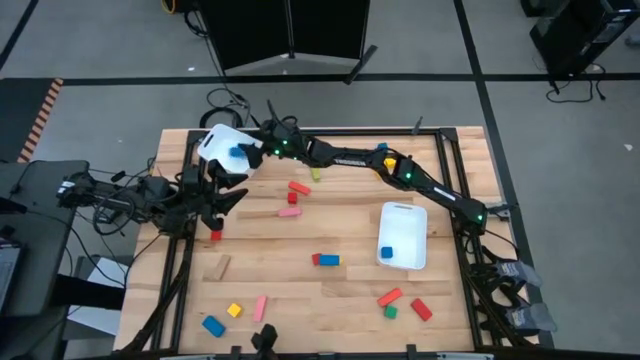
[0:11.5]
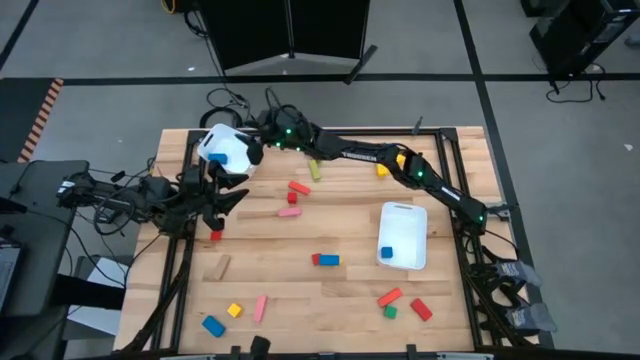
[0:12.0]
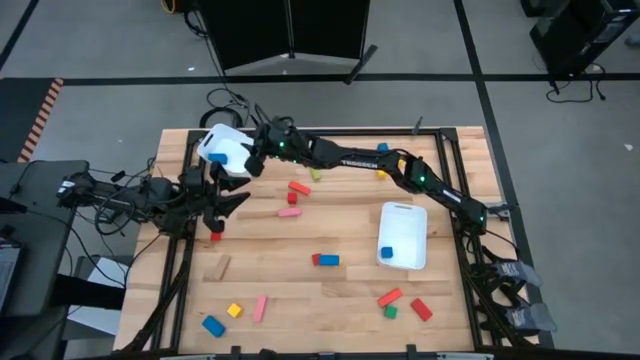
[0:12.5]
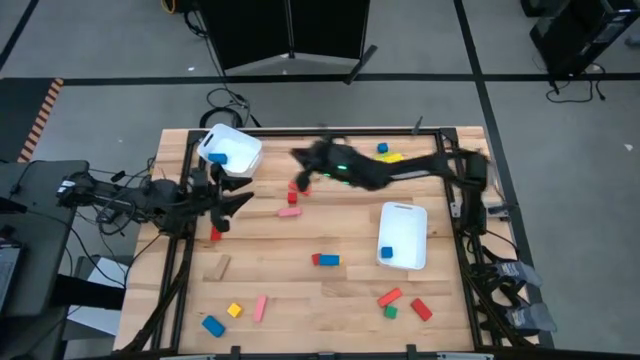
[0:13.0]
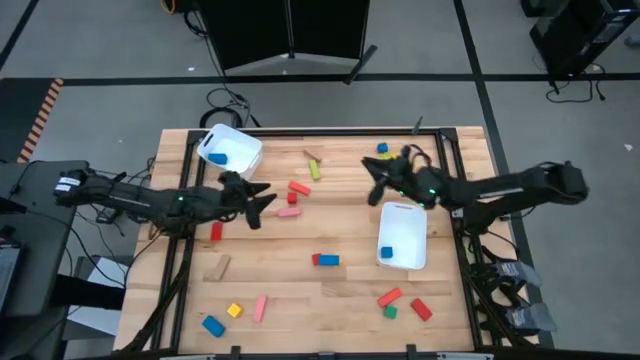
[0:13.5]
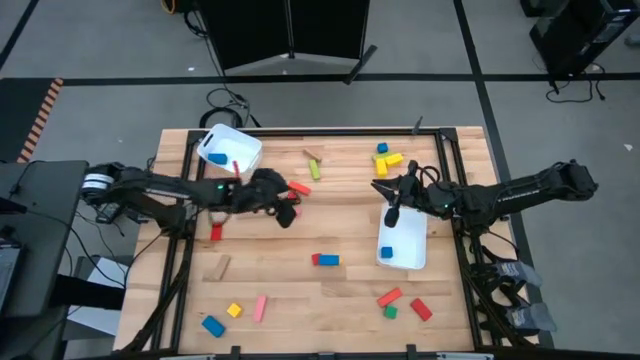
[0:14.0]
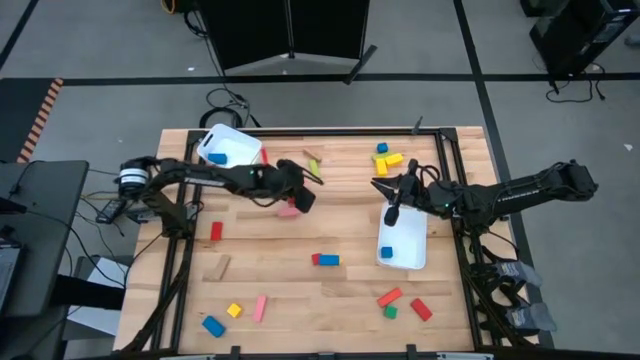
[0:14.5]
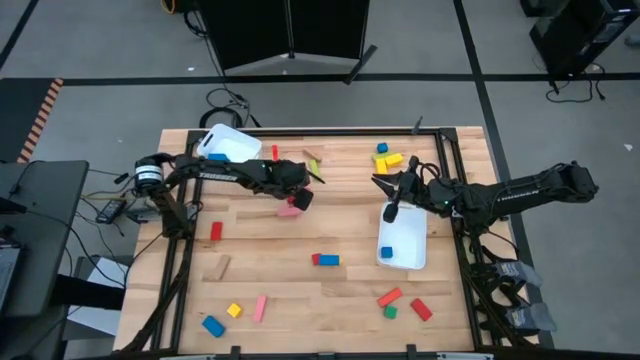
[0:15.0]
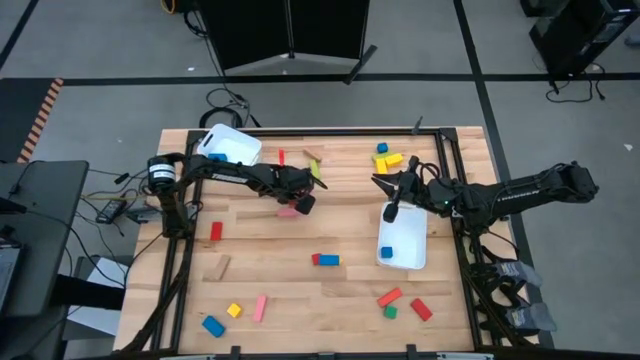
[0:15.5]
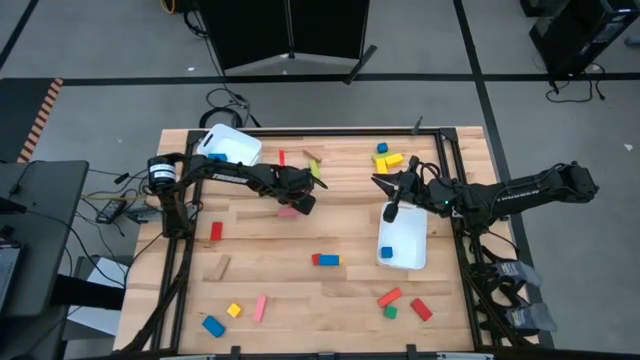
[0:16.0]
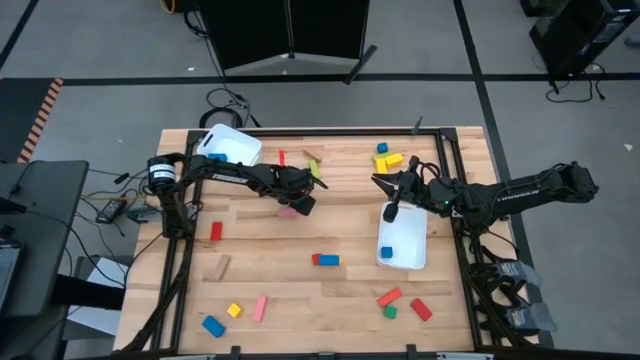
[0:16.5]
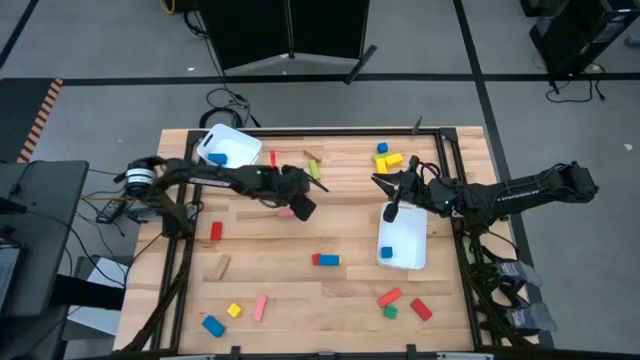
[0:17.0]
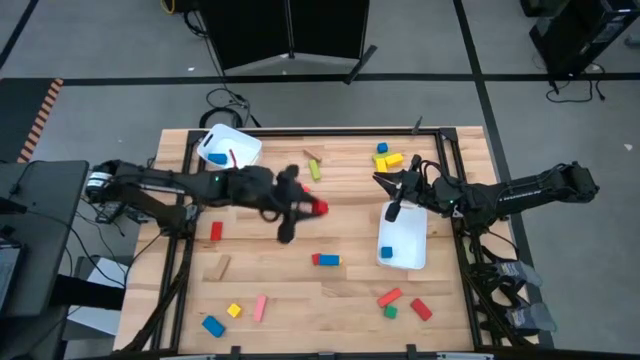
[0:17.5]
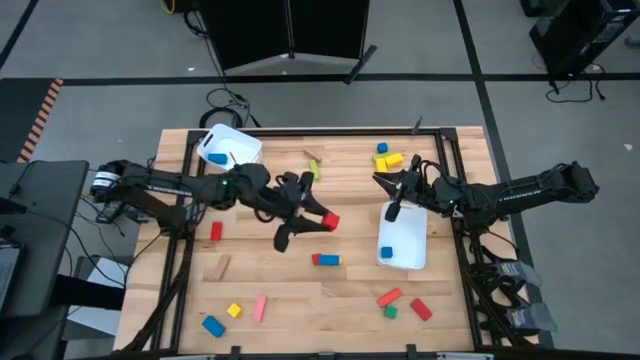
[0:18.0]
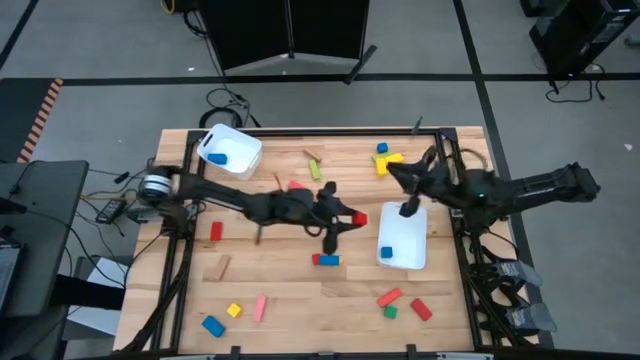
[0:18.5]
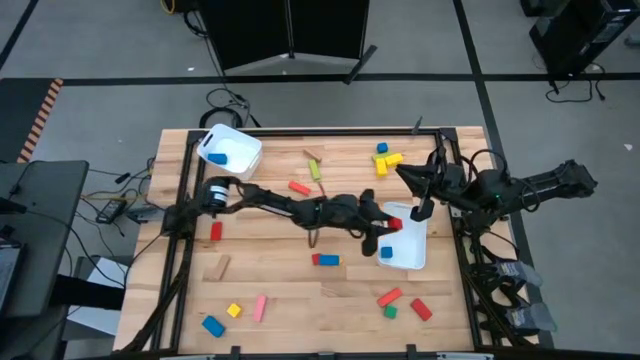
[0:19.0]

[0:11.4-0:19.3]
Task: Sort blocks by size
Put the top red cube block into the bottom white bin

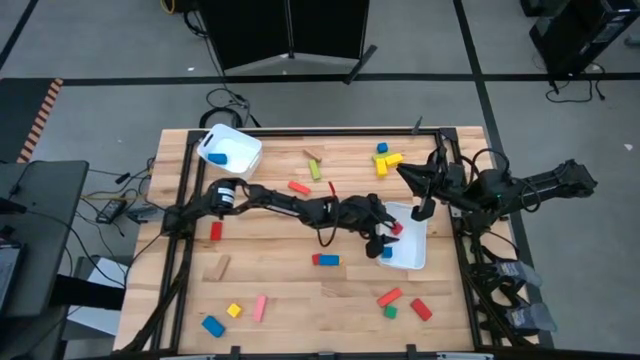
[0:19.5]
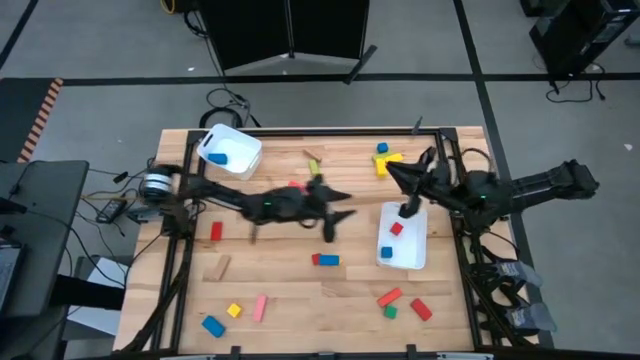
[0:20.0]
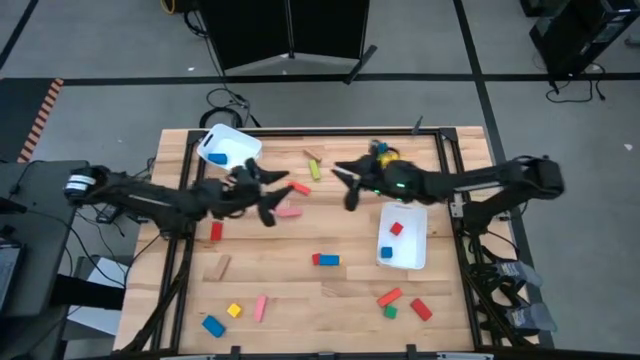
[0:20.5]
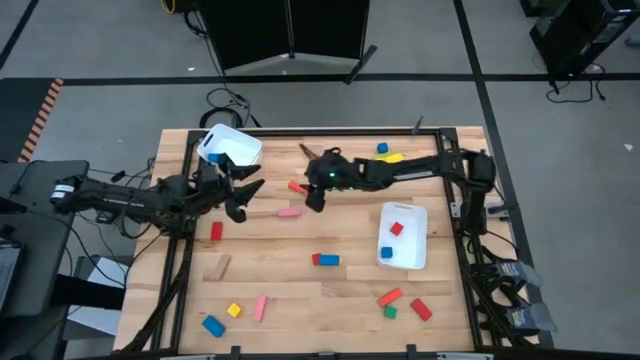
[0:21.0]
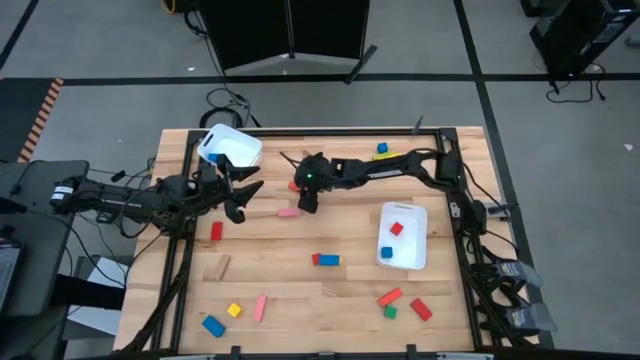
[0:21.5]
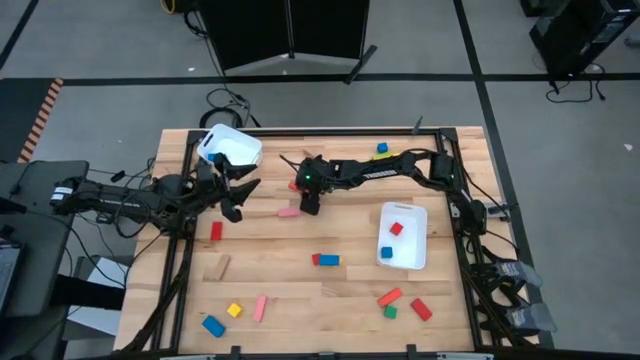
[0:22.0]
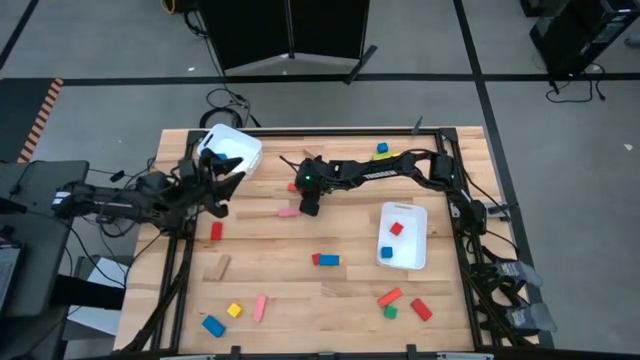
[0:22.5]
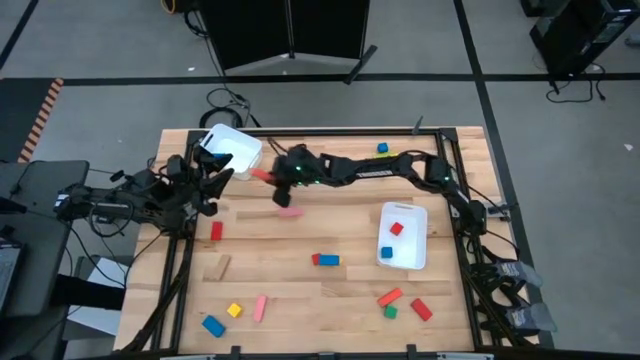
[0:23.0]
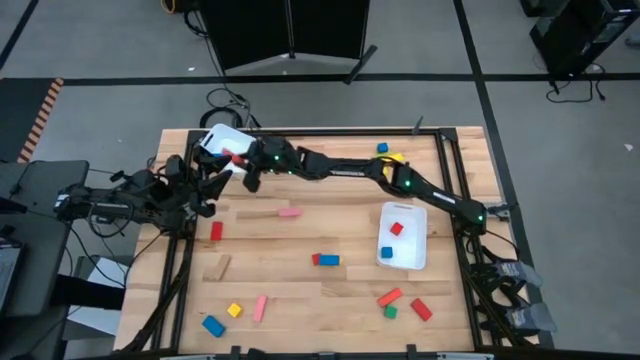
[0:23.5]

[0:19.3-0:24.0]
Put the top orange rectangular block into the top white bin

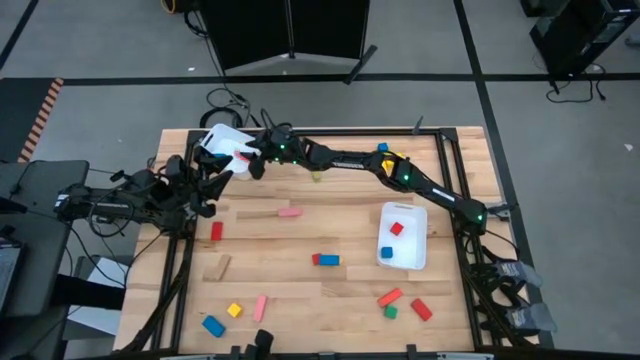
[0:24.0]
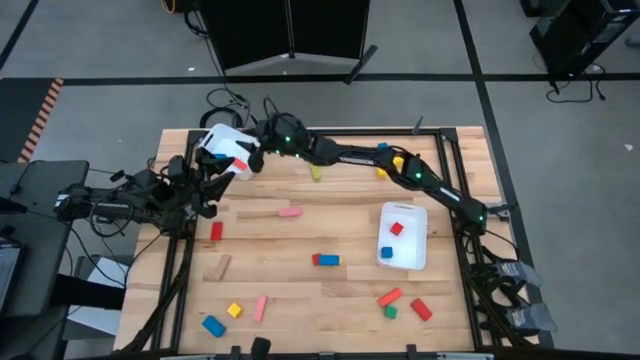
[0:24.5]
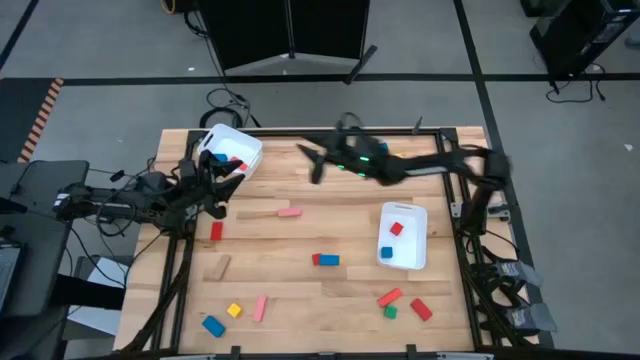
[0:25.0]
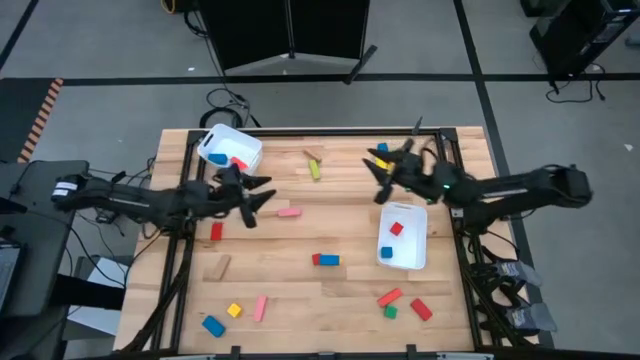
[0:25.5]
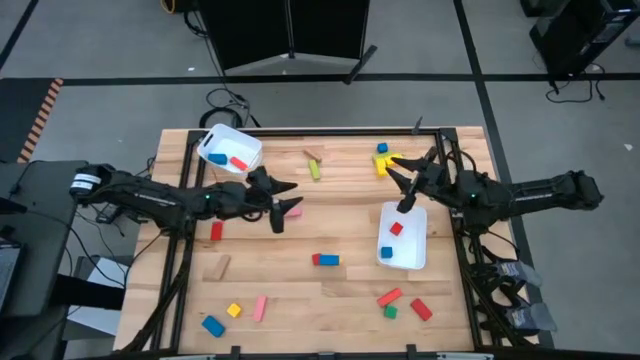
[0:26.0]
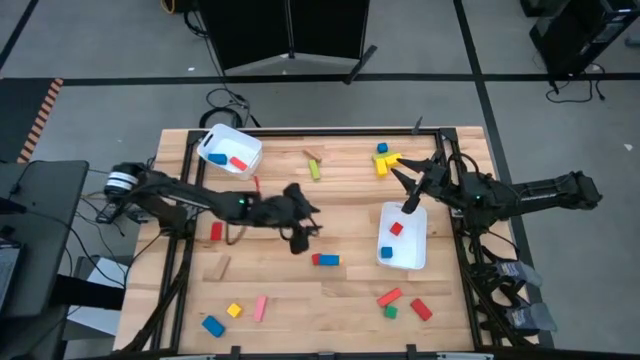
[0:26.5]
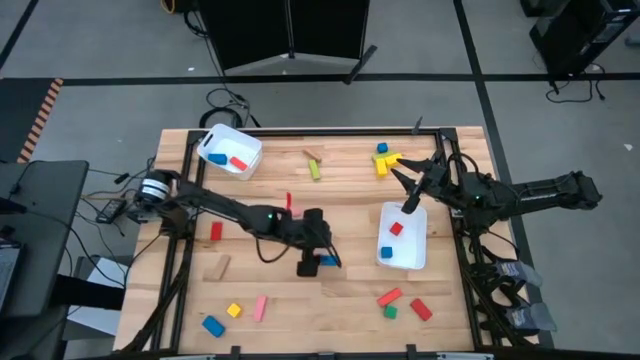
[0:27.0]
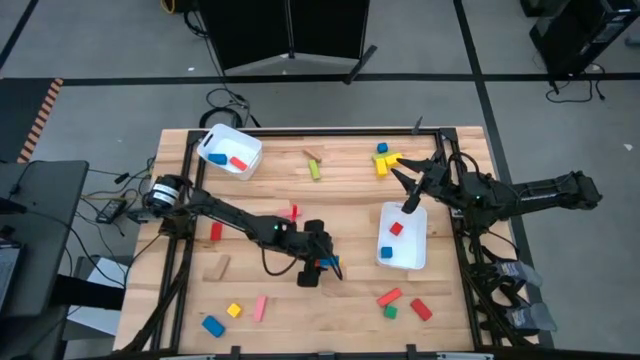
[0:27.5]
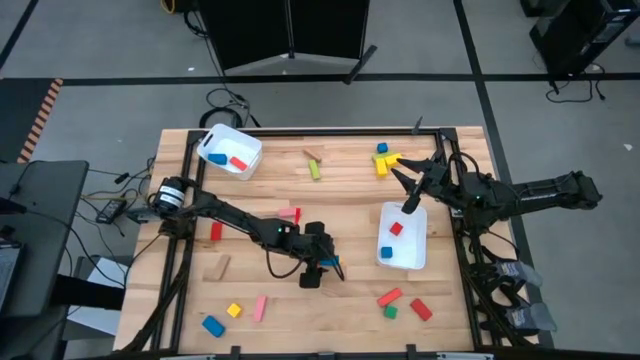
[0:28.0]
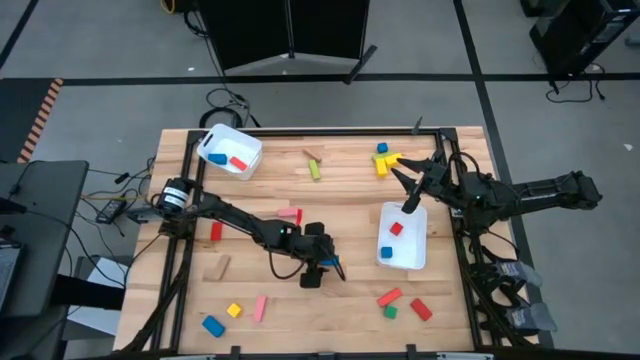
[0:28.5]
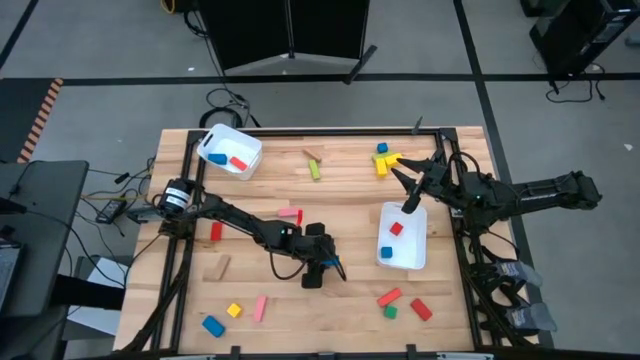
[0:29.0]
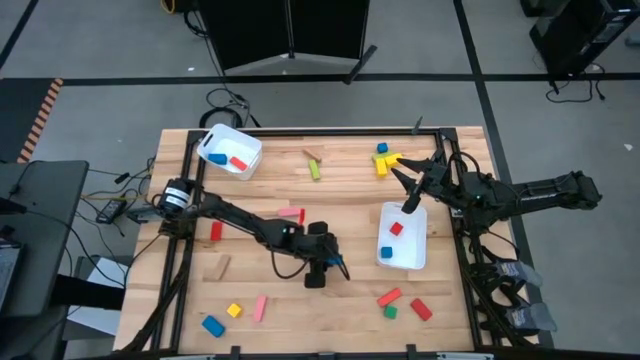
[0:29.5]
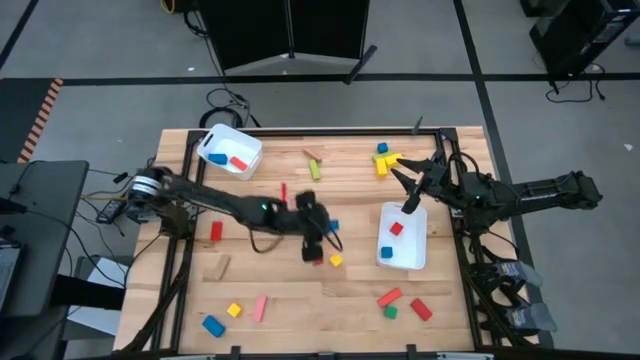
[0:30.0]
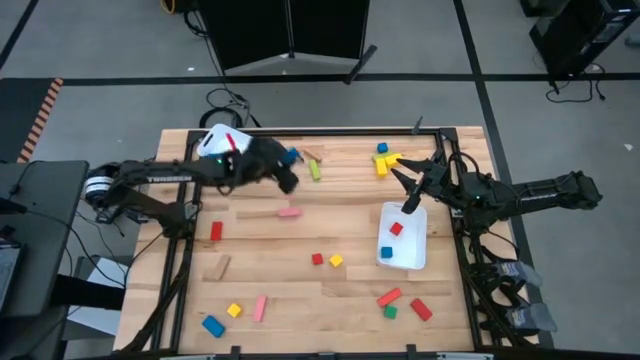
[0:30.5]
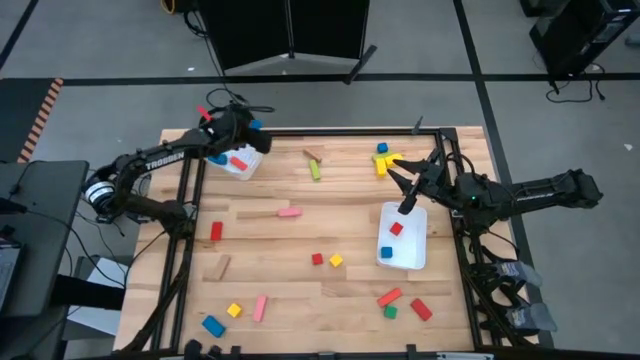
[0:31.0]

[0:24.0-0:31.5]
Put the top blue rectangular block into the top white bin
